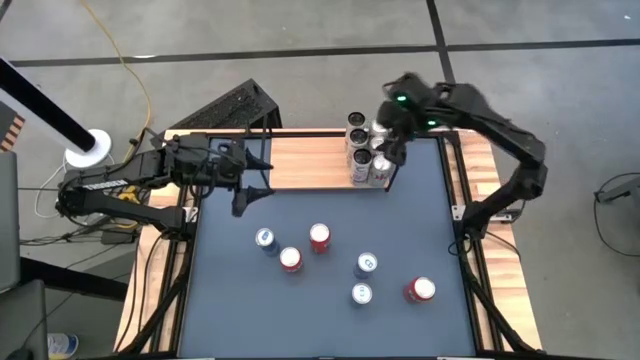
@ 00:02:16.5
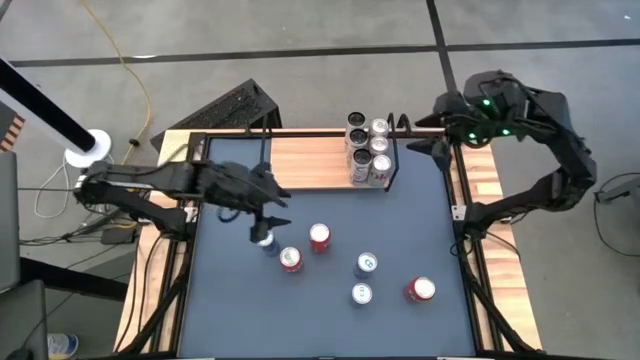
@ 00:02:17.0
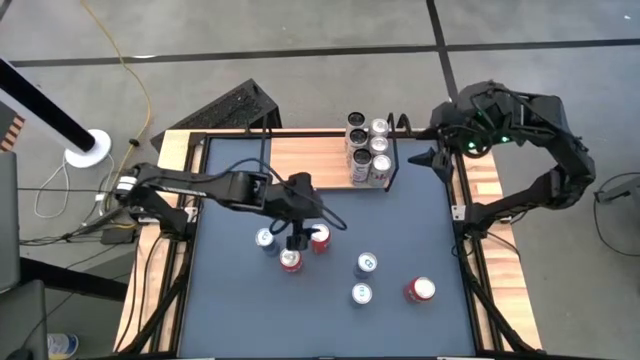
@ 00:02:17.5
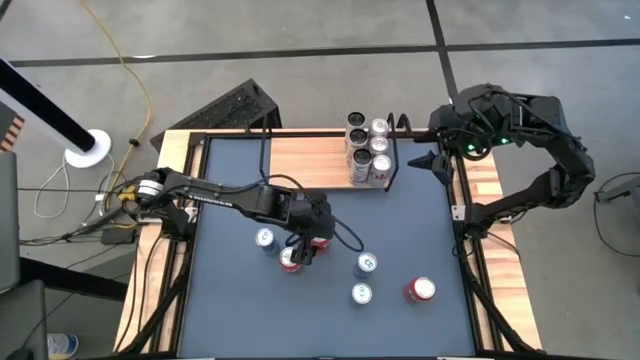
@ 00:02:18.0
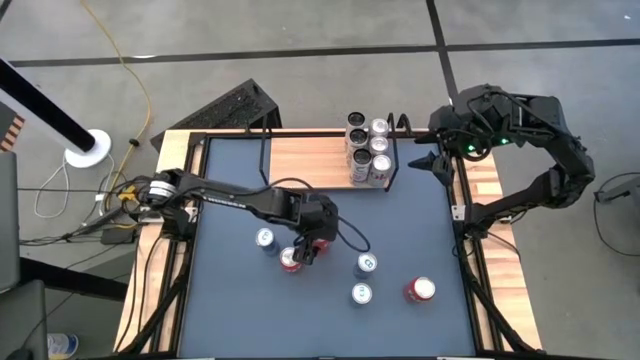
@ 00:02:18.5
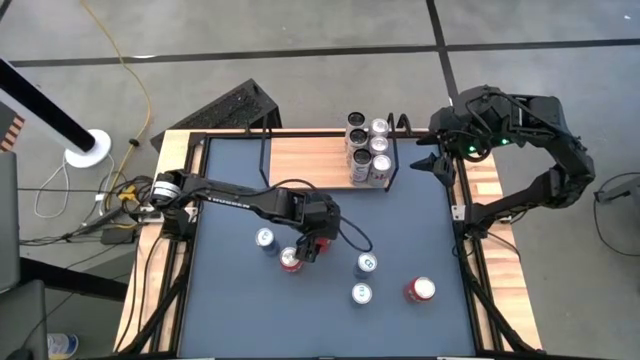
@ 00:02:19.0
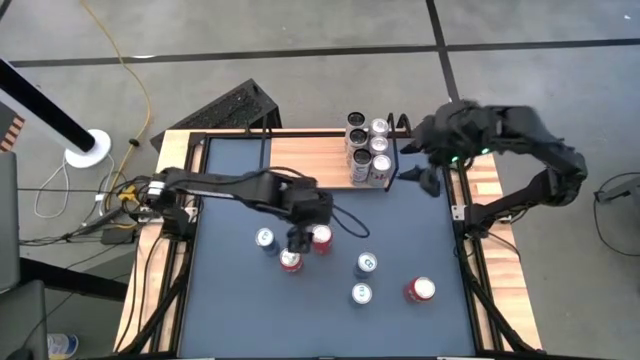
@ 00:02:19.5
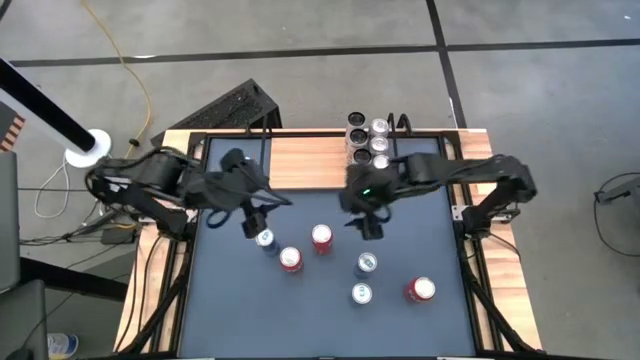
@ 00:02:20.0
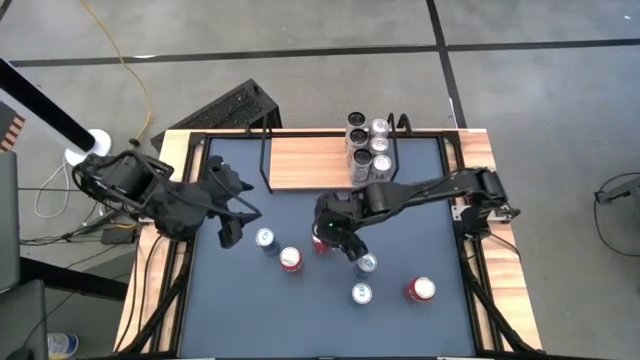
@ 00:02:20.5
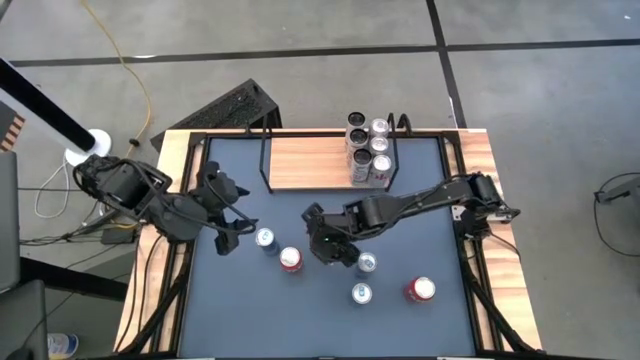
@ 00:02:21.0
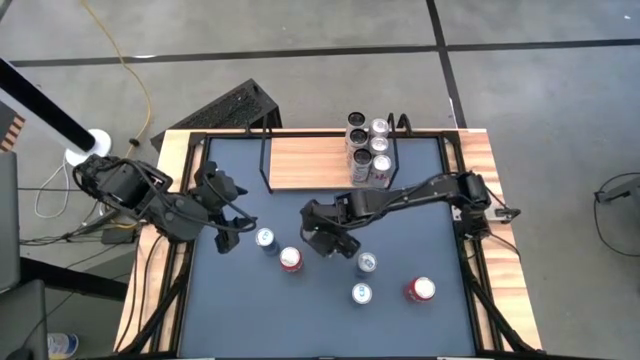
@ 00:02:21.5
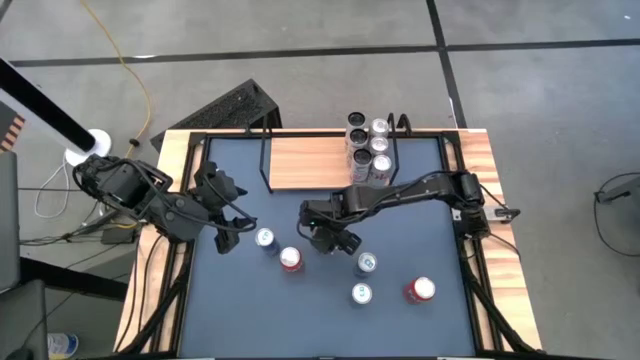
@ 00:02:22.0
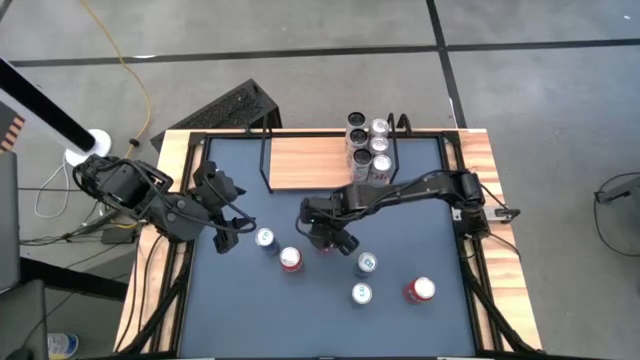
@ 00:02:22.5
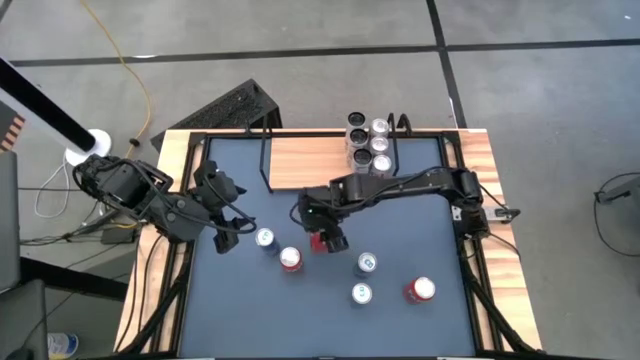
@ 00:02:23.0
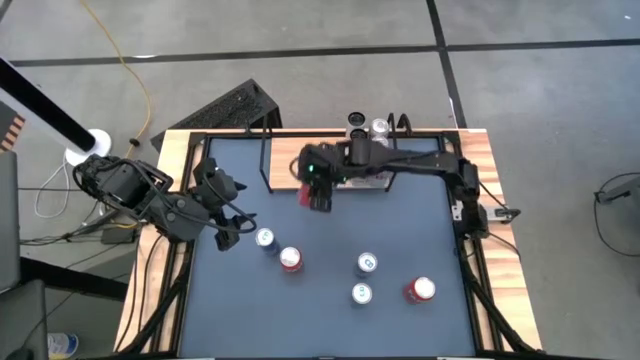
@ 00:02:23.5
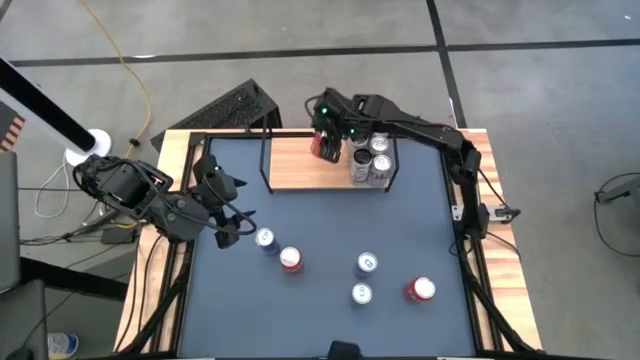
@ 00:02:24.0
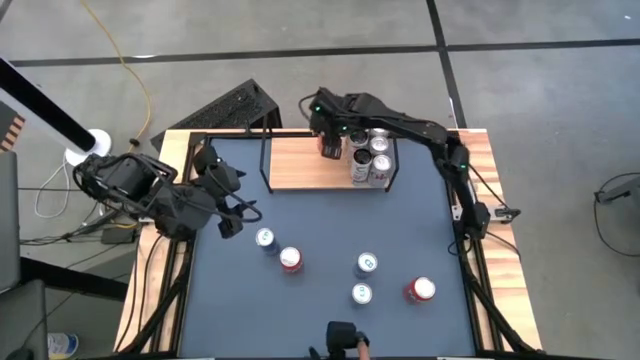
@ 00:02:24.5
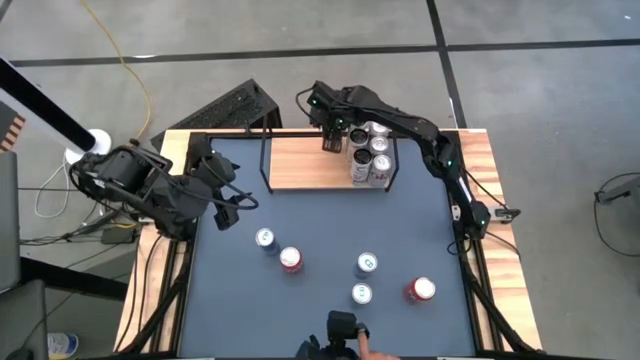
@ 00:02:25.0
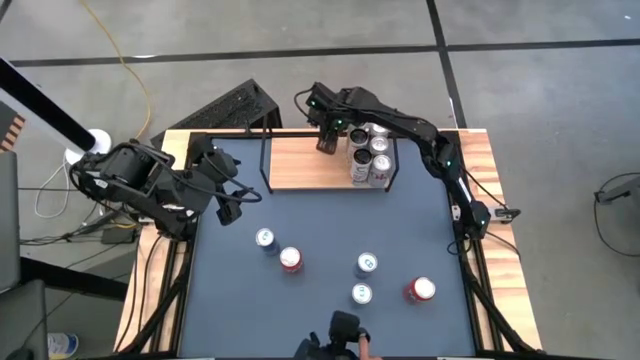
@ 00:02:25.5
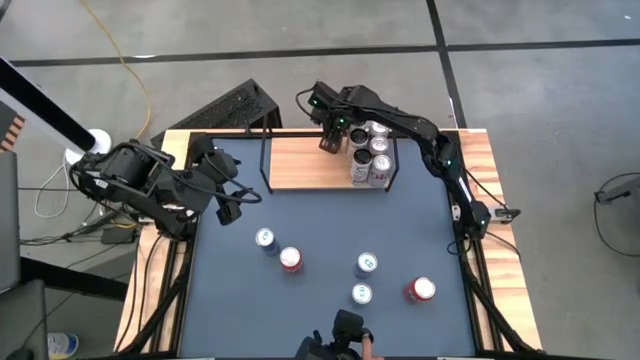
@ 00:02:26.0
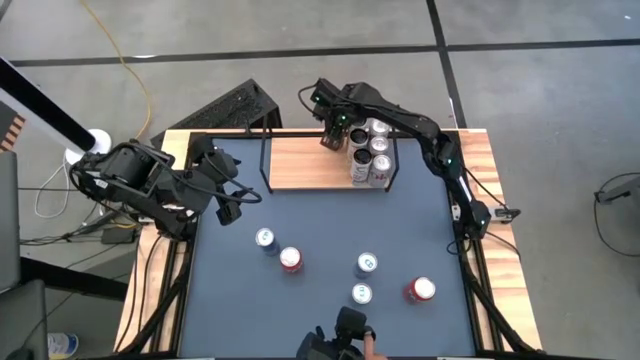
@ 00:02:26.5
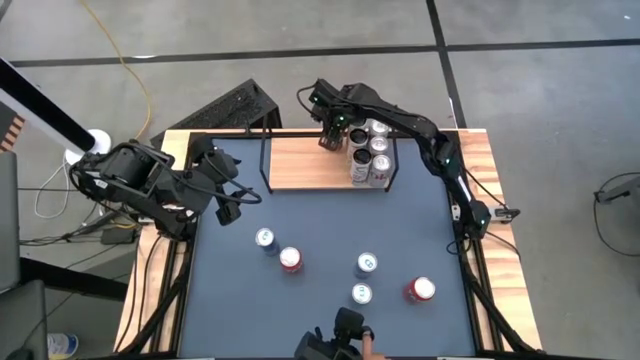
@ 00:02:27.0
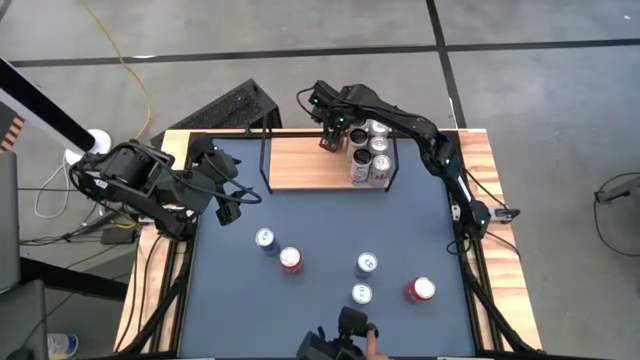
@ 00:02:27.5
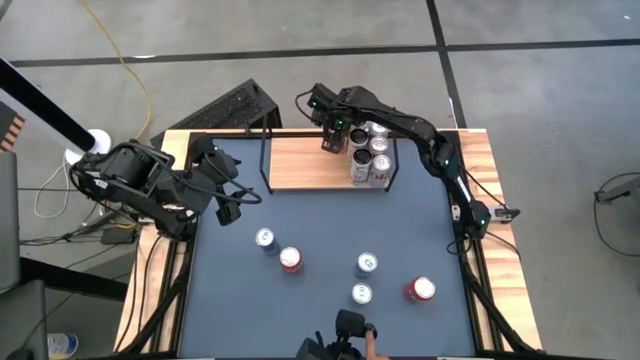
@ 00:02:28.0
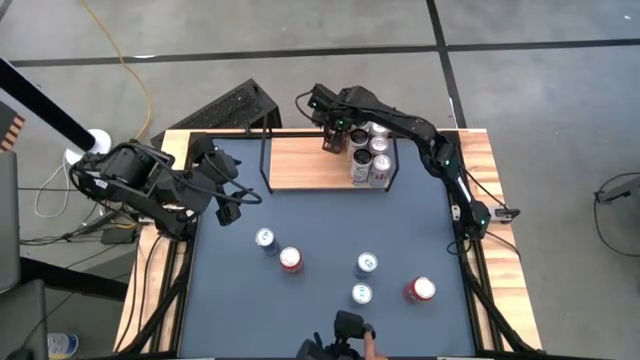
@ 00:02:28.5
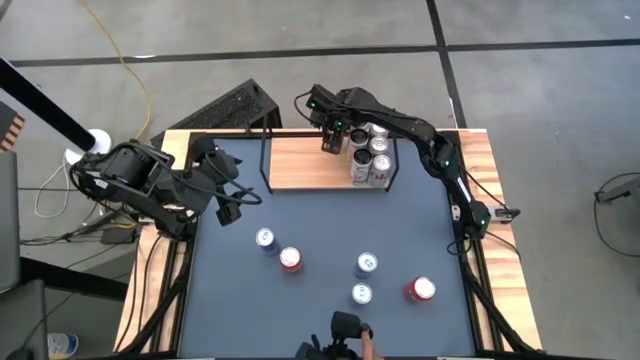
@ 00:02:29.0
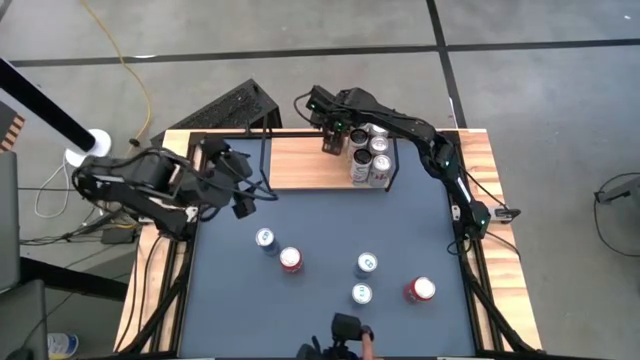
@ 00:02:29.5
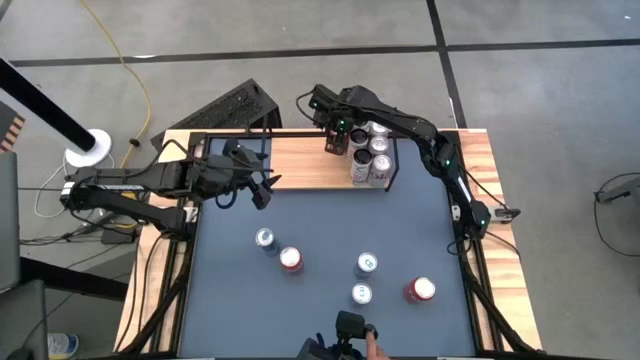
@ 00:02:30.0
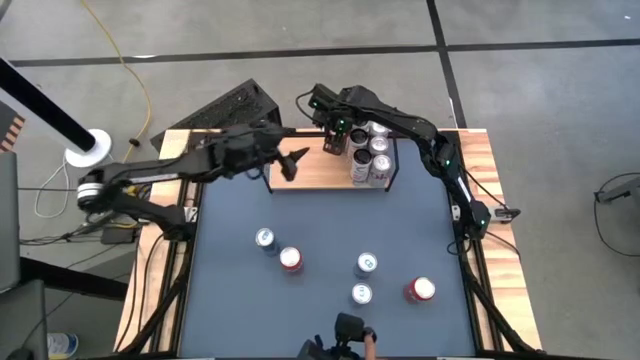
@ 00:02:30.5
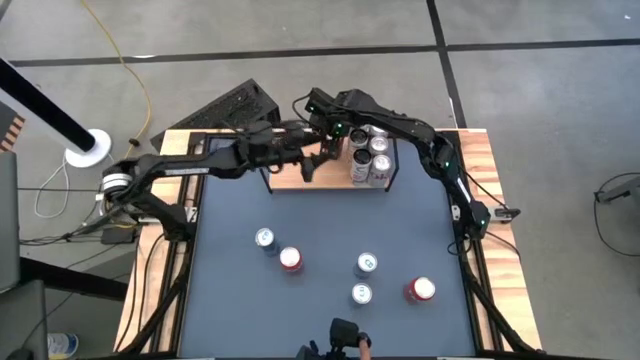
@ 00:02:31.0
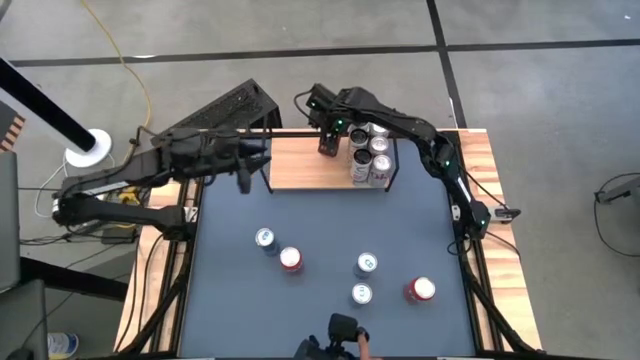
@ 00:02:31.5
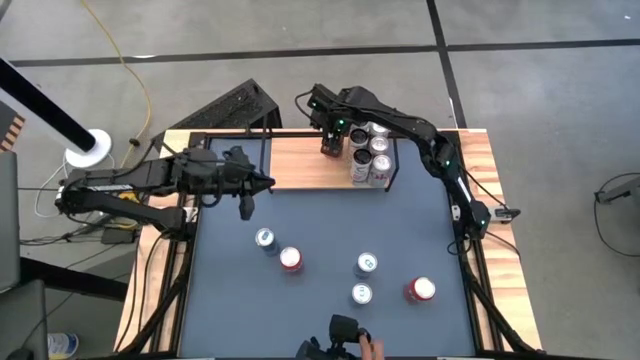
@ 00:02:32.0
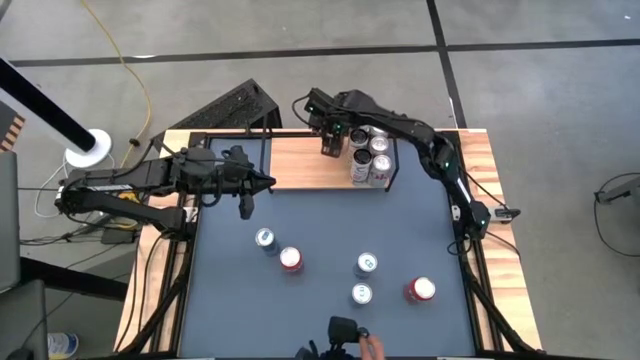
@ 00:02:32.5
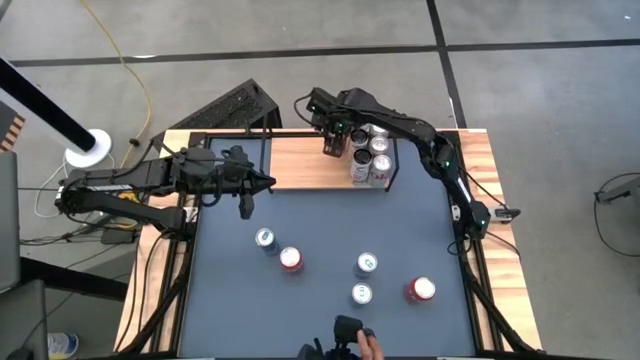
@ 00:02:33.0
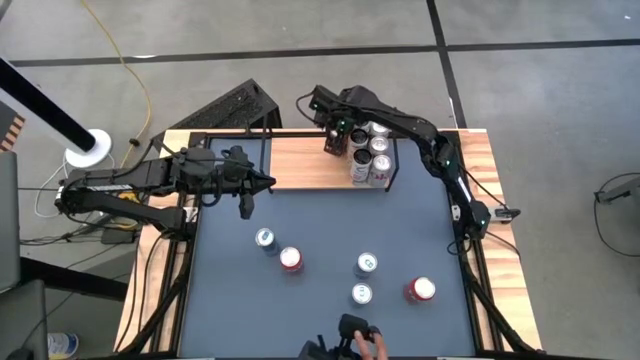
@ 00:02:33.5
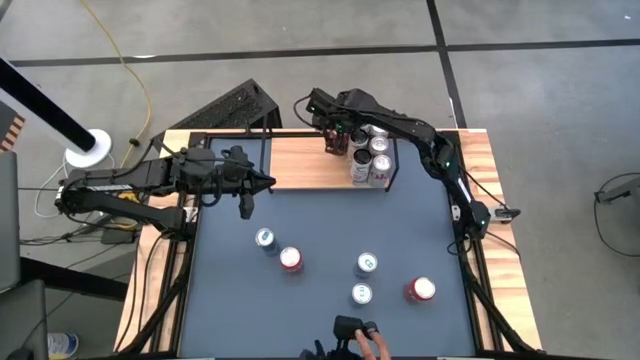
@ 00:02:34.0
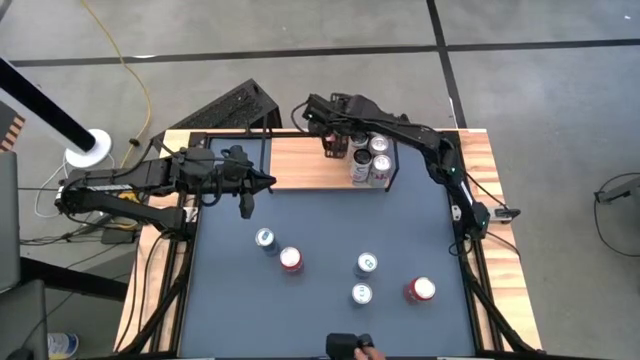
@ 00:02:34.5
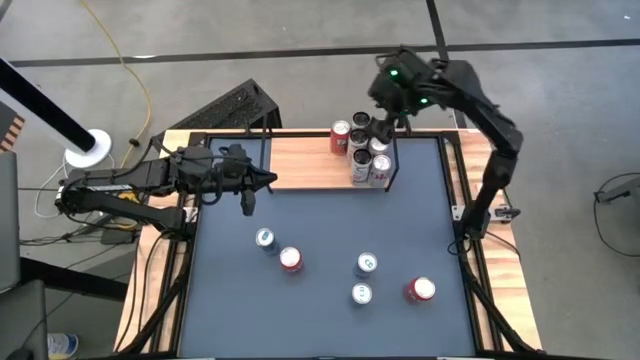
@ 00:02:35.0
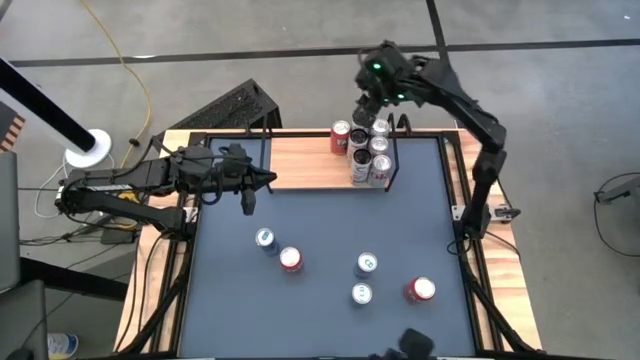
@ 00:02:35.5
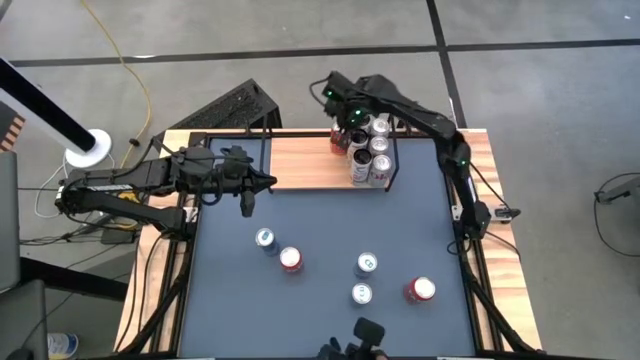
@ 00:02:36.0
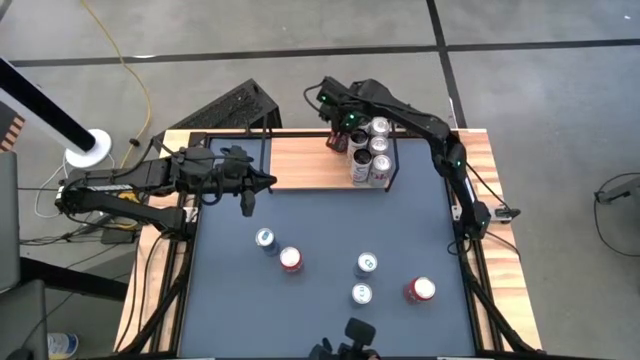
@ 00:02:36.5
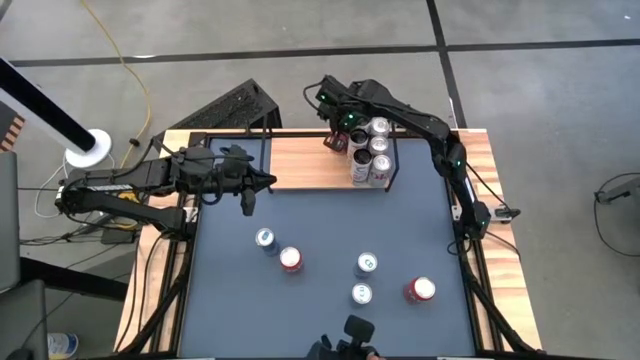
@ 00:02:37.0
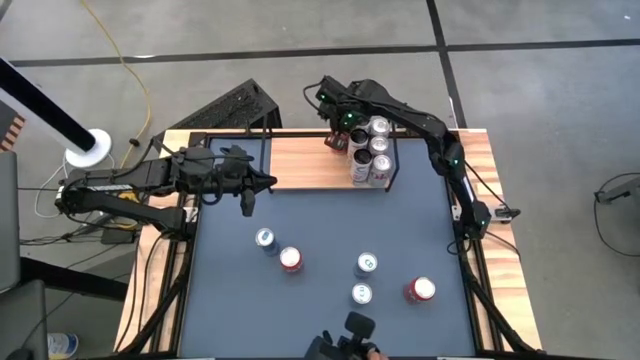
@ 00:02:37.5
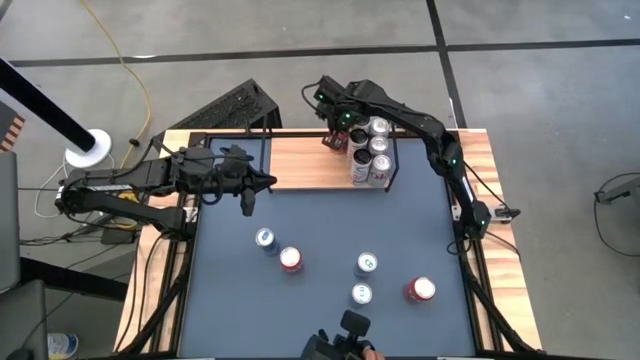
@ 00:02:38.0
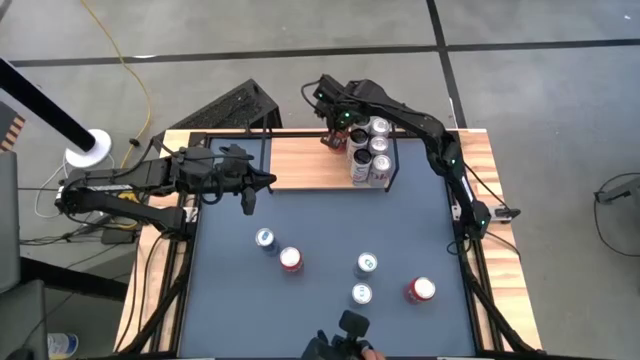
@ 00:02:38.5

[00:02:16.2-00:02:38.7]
Task: Place canned beverage on shelf
Put the top red soda can on the shelf
